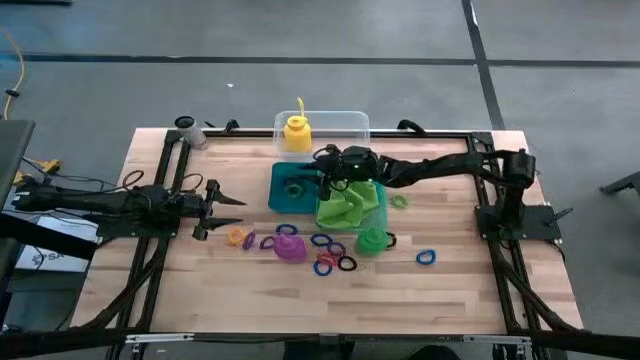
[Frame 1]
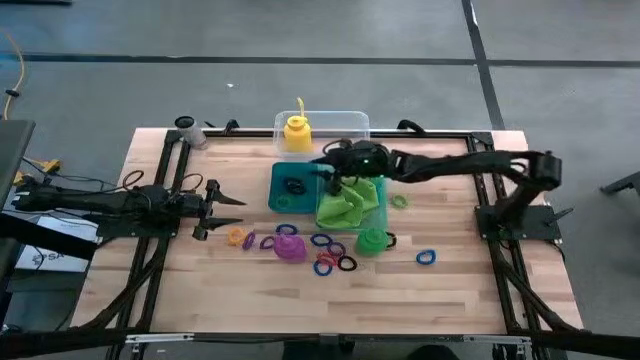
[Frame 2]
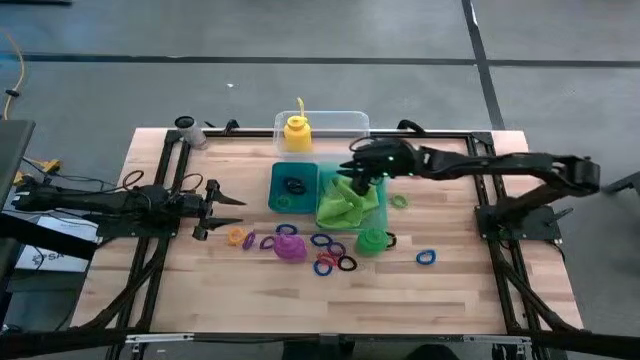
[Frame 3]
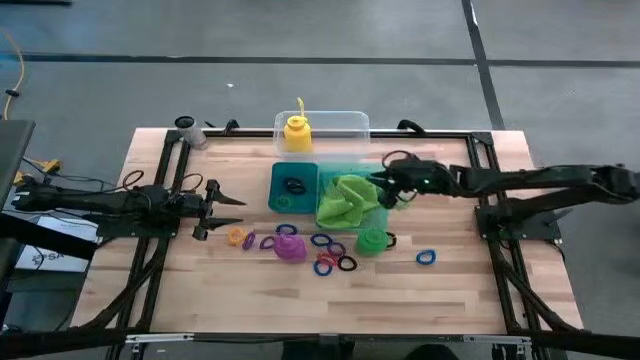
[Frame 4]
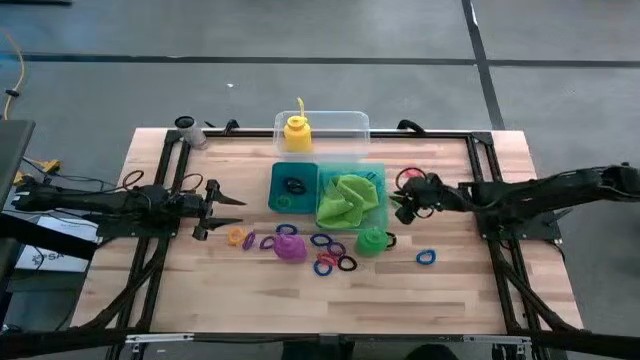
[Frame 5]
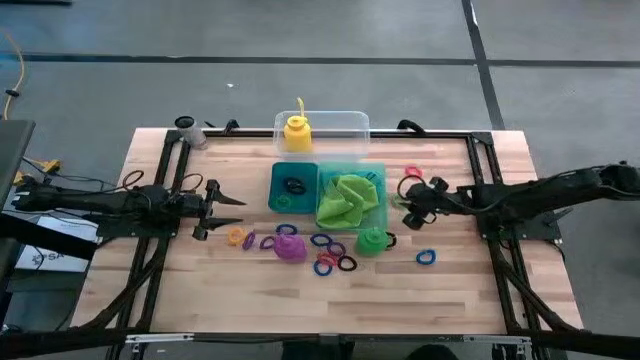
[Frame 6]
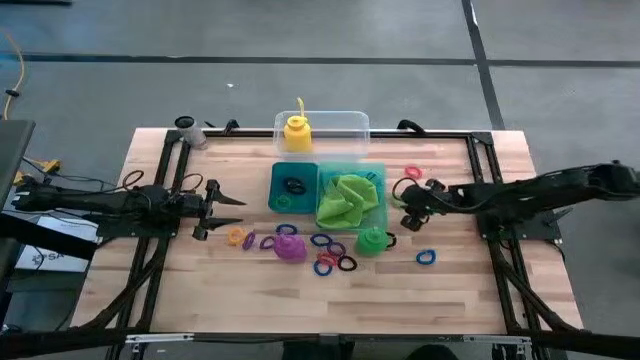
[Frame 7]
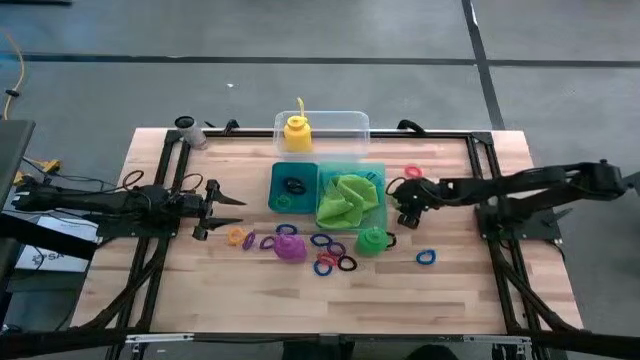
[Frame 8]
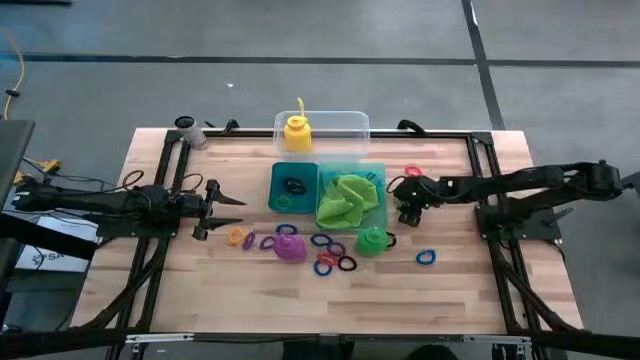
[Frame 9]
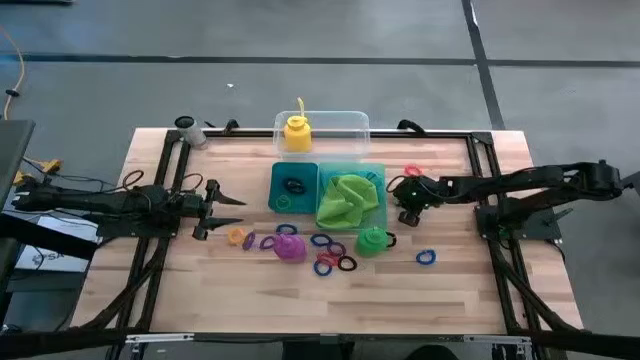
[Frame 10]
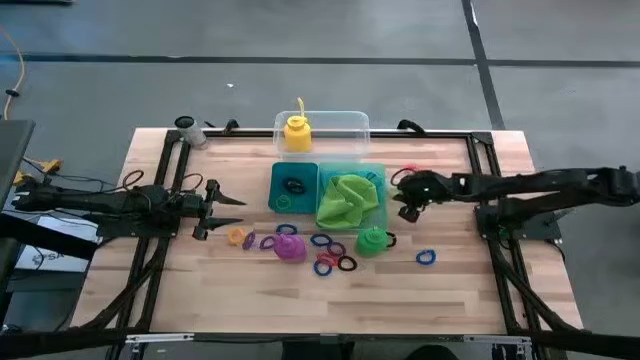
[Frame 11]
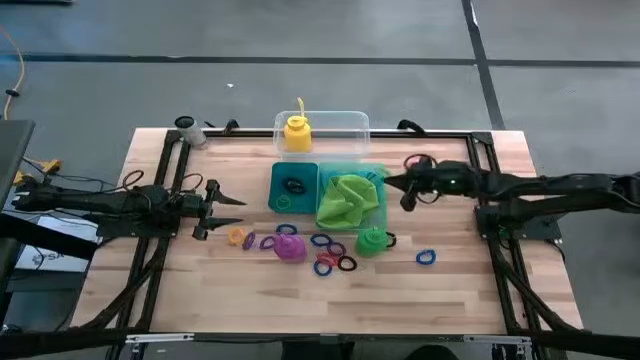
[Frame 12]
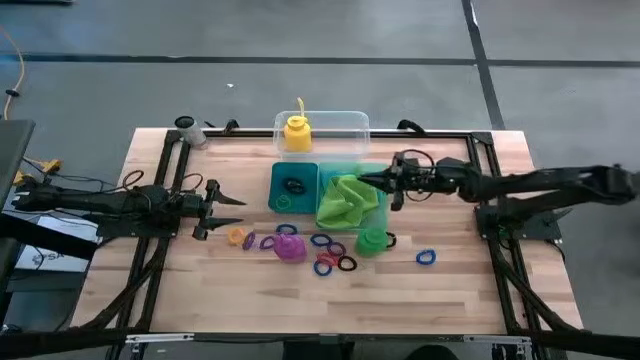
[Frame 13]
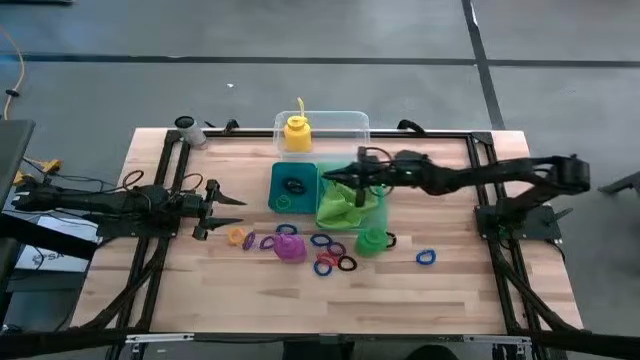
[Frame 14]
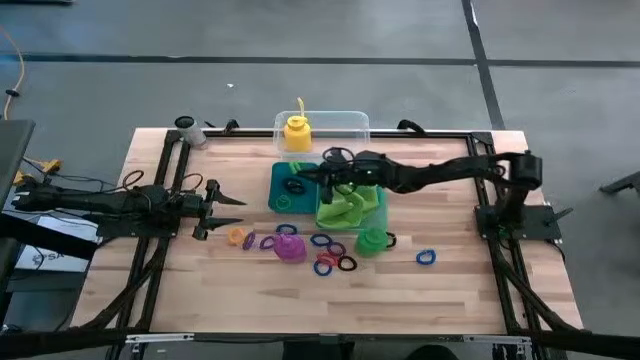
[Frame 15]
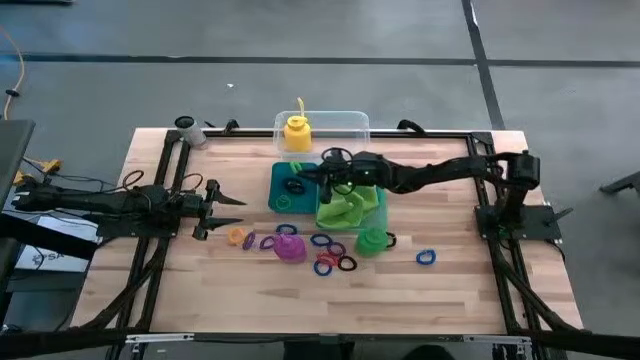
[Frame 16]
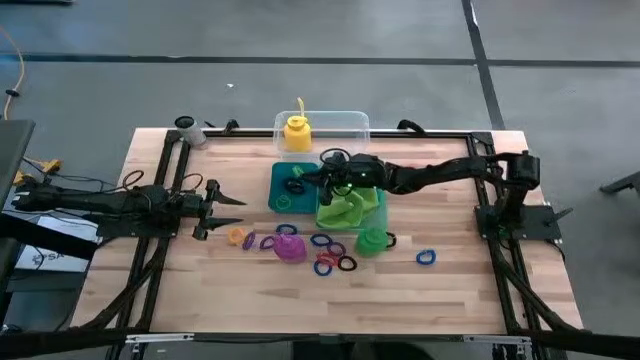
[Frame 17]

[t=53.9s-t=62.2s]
Task: Pick & Place Sports Items
Put the green spring keychain into the blue bin

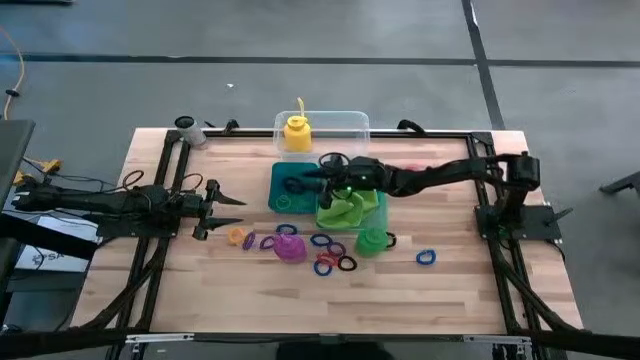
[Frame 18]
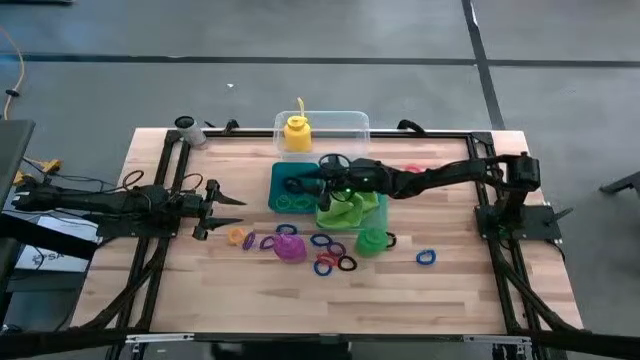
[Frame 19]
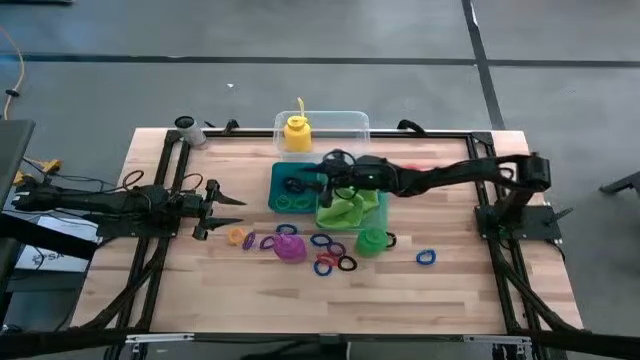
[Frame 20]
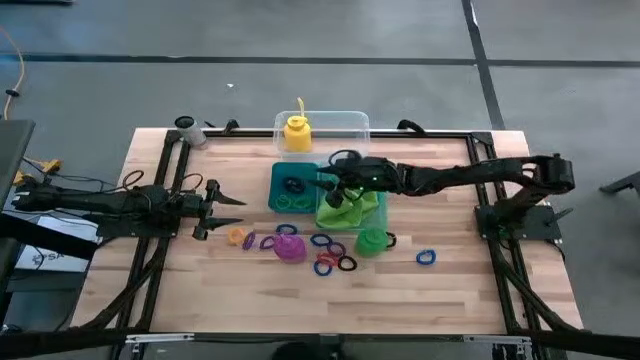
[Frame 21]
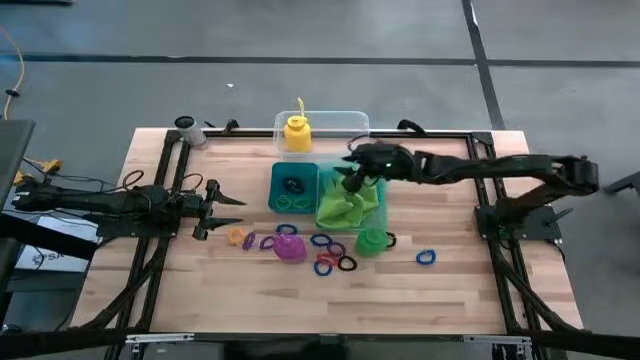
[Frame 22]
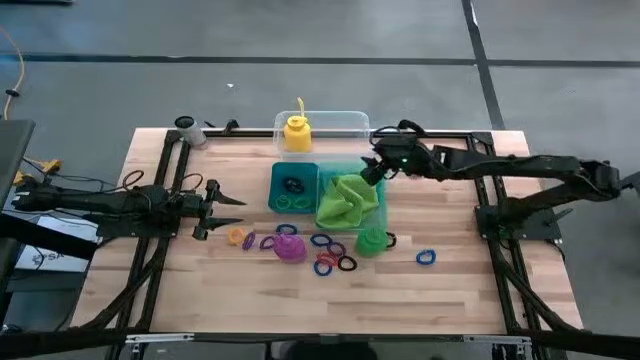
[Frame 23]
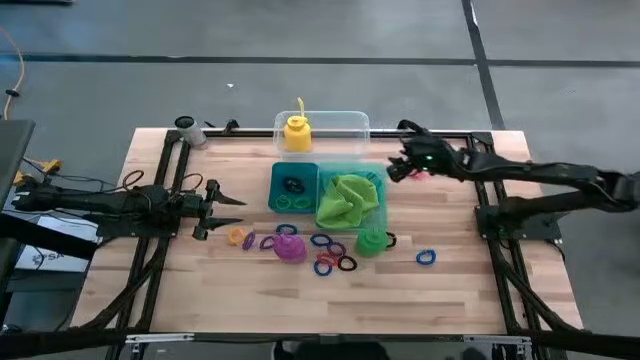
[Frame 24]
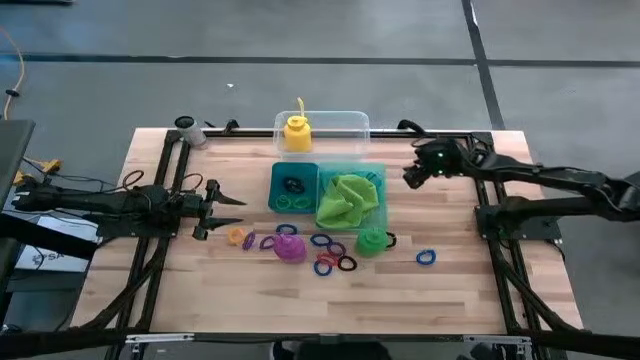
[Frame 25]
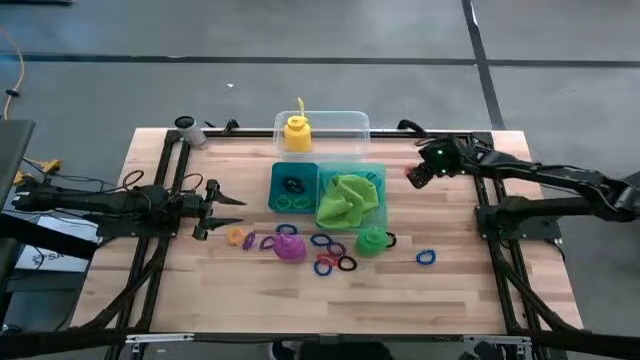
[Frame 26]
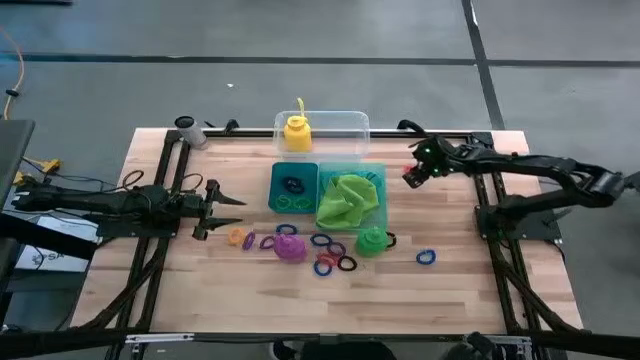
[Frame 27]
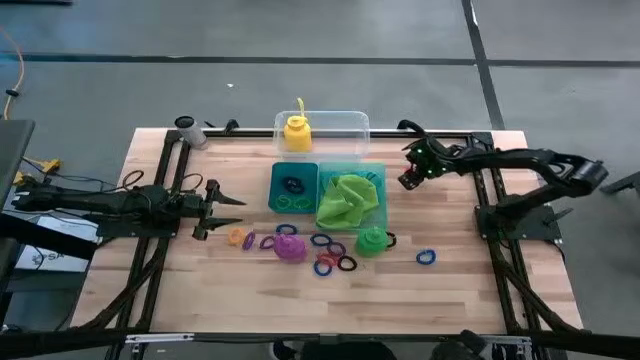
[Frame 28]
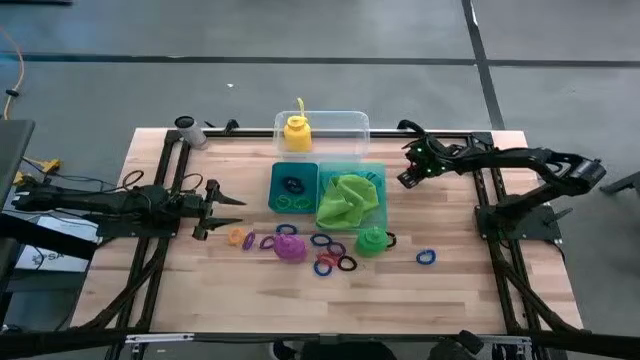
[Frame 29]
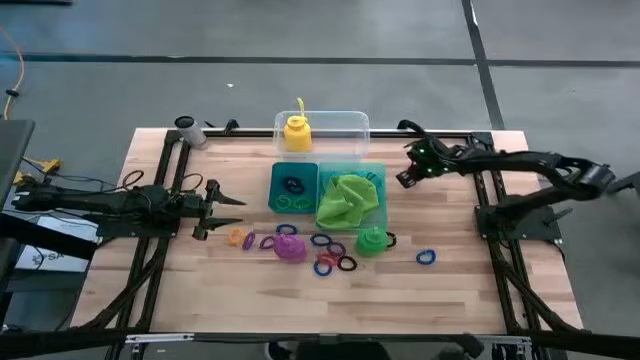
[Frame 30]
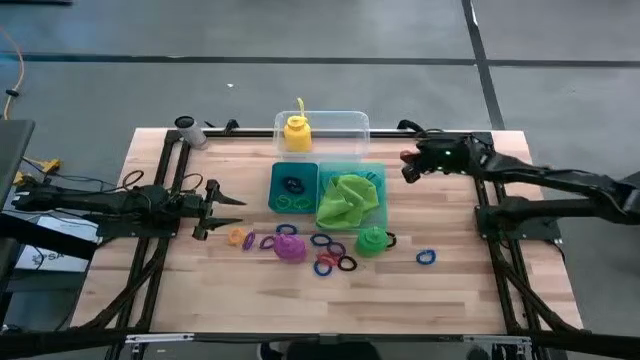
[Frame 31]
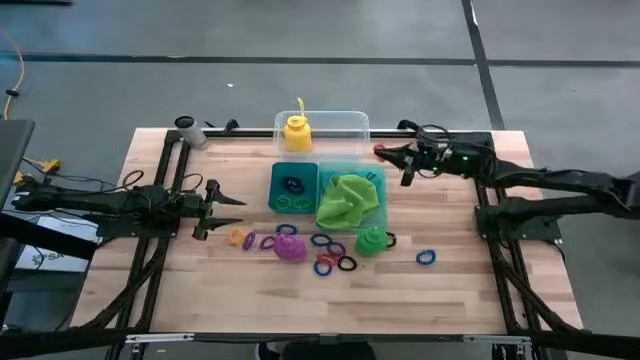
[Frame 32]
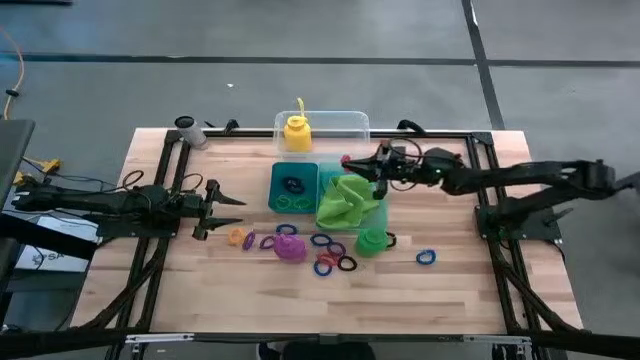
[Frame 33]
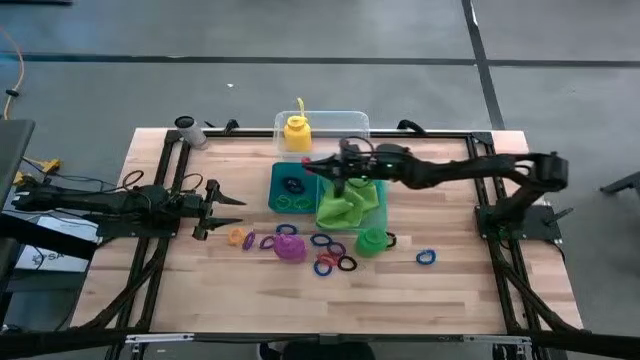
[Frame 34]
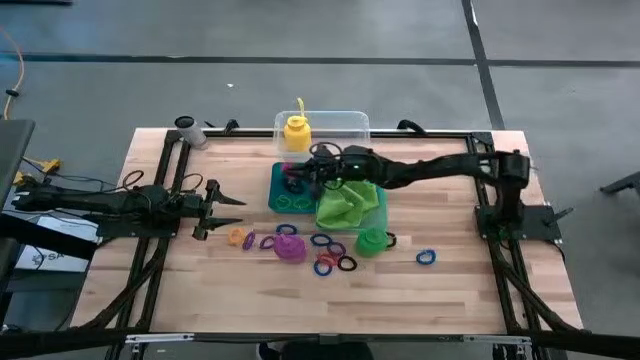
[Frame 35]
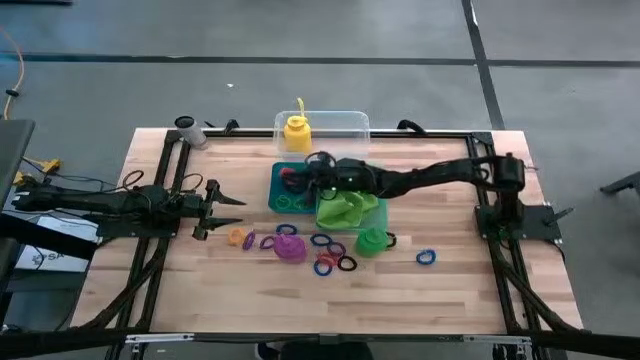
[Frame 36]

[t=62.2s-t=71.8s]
Put top orange spring keychain into the blue bin

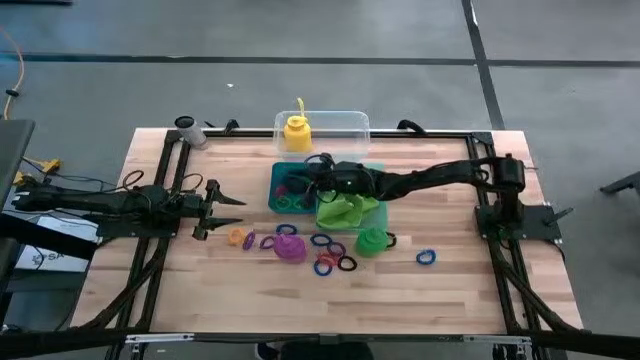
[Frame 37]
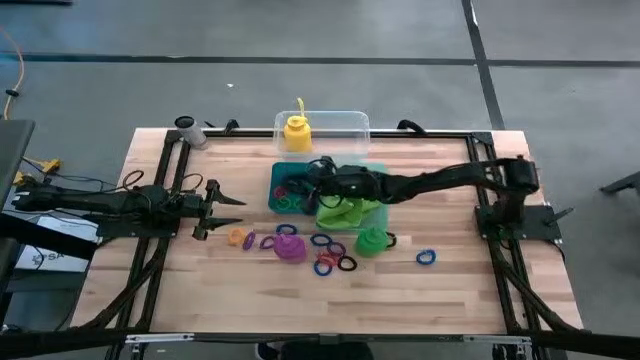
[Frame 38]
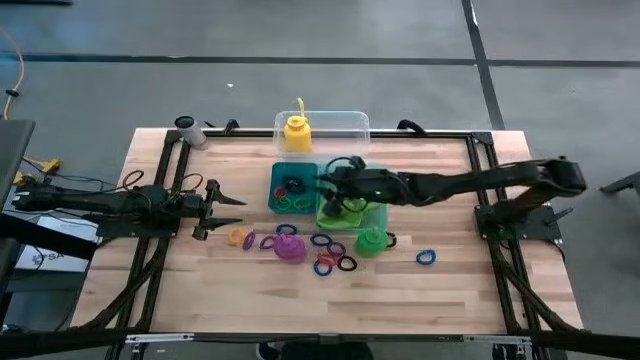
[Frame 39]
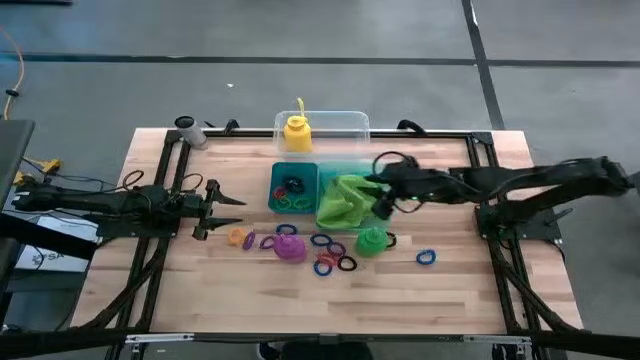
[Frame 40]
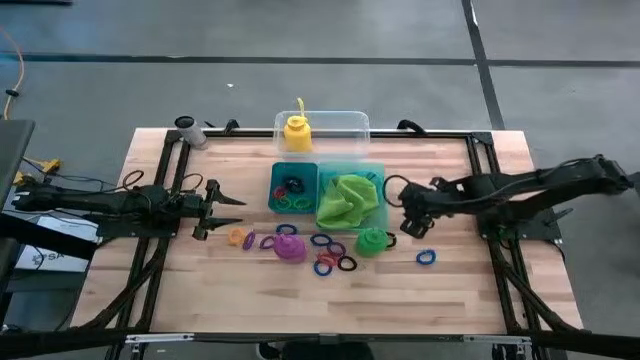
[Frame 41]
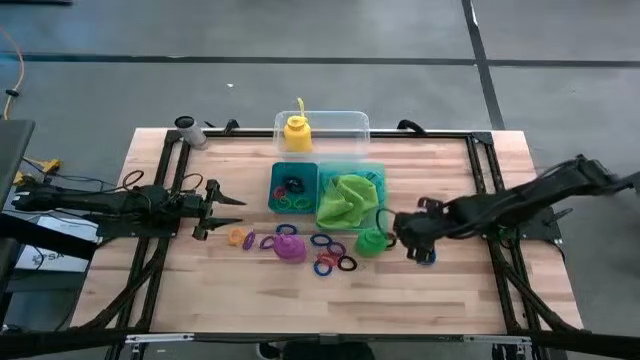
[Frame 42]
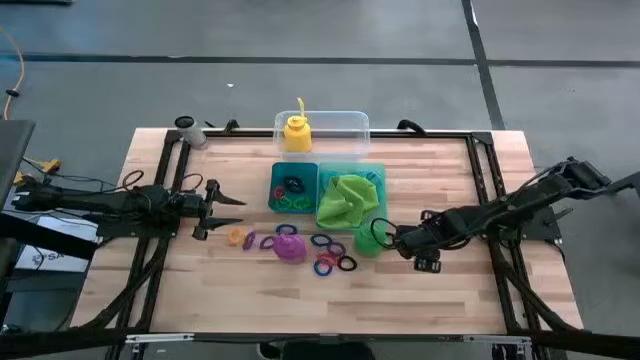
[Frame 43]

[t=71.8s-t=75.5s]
Put the green tumbler into the transparent bin
